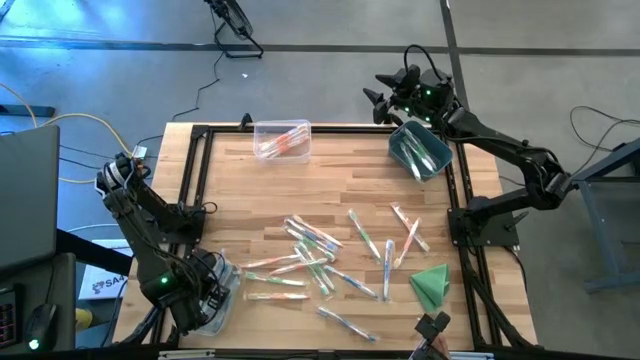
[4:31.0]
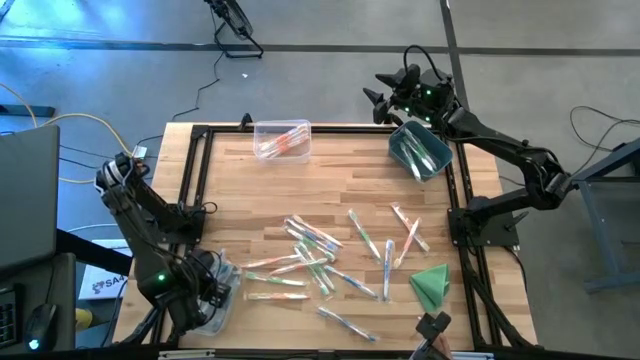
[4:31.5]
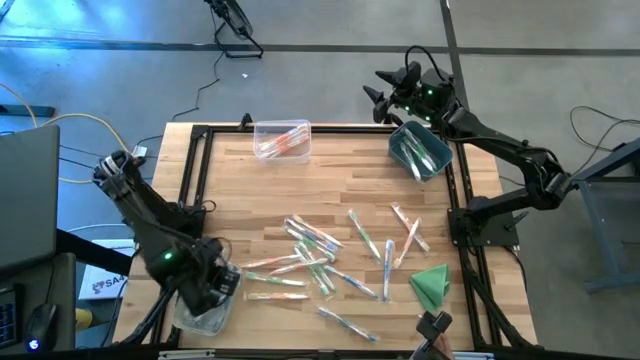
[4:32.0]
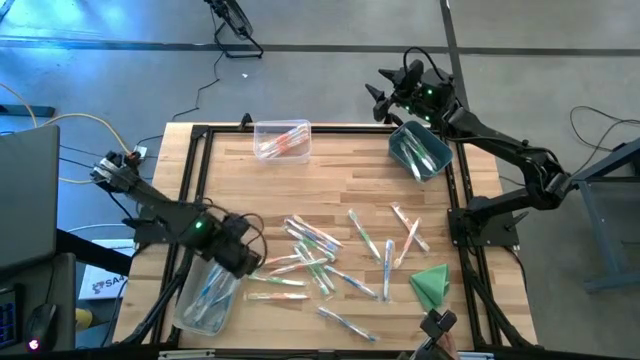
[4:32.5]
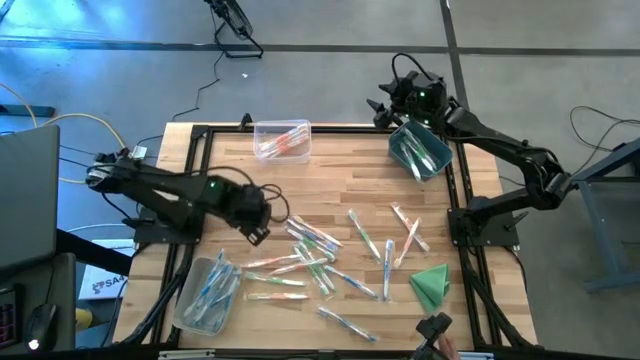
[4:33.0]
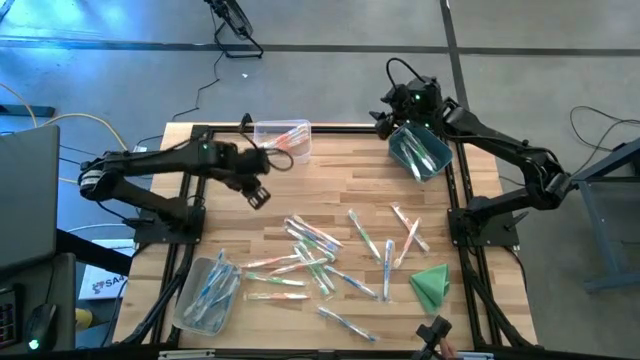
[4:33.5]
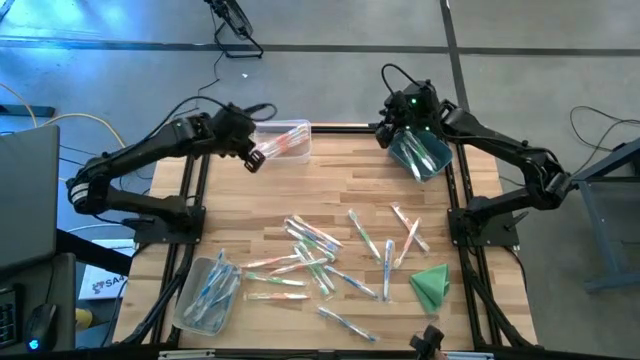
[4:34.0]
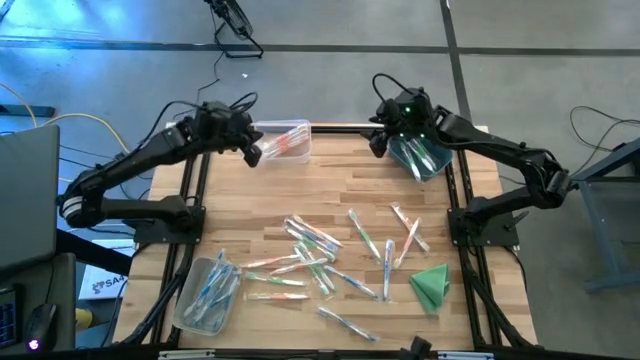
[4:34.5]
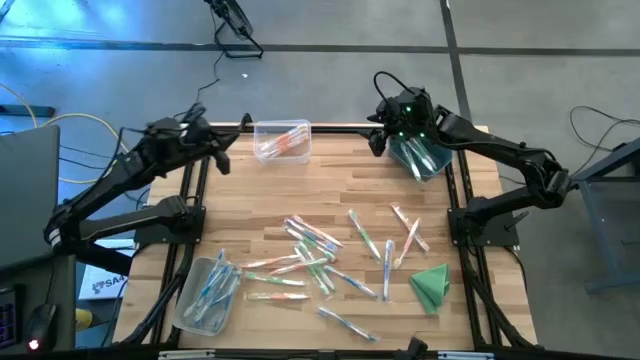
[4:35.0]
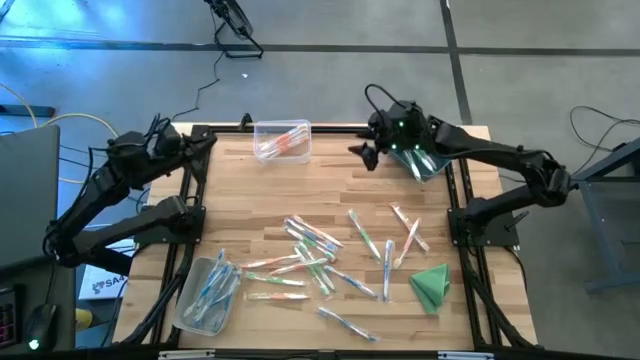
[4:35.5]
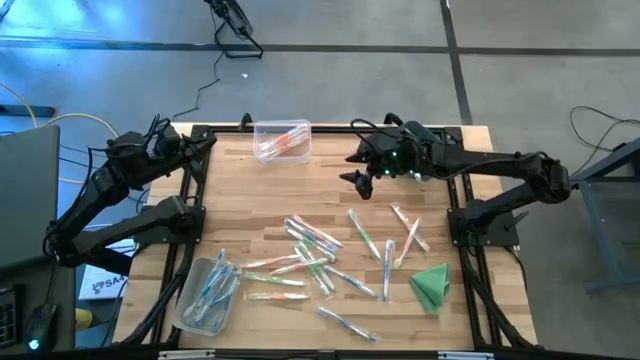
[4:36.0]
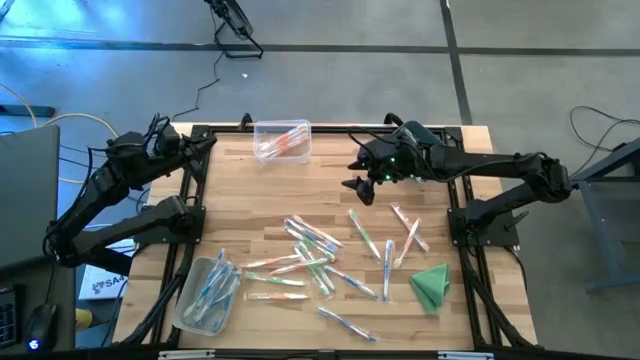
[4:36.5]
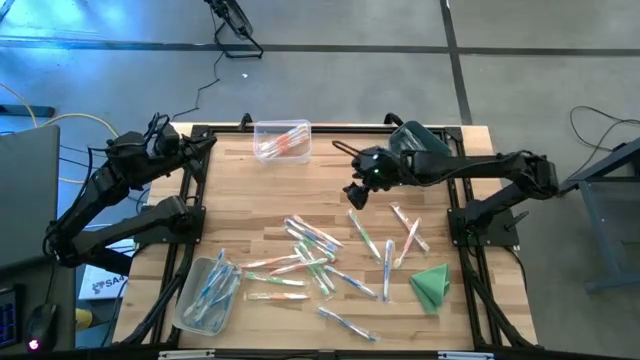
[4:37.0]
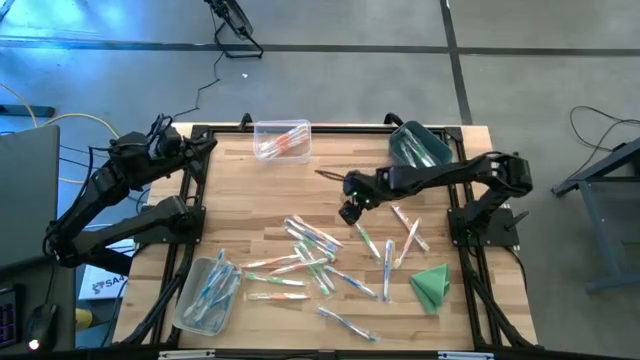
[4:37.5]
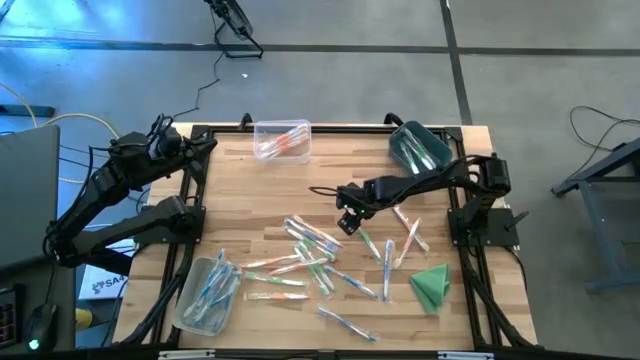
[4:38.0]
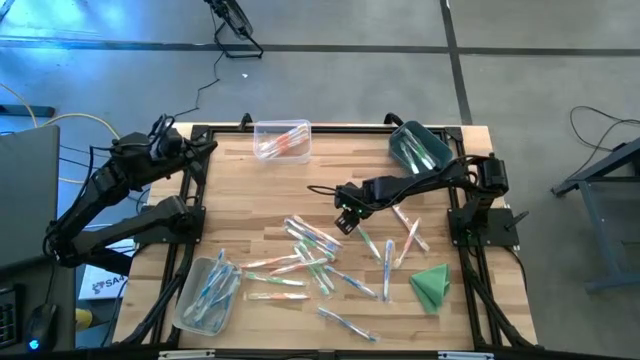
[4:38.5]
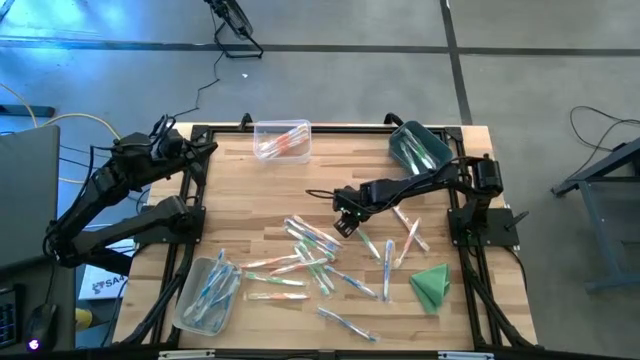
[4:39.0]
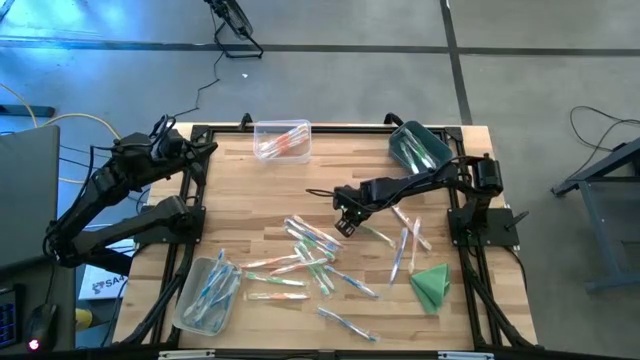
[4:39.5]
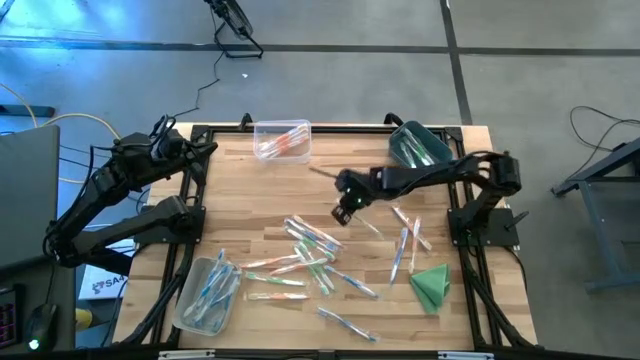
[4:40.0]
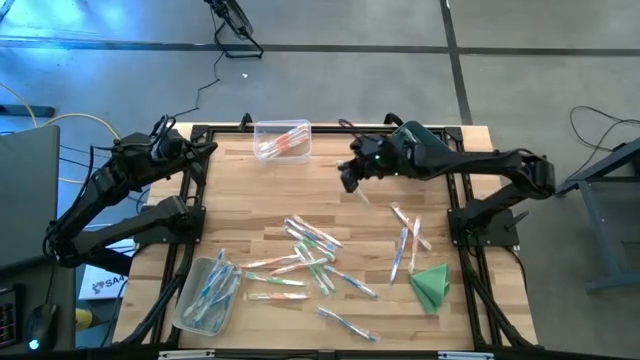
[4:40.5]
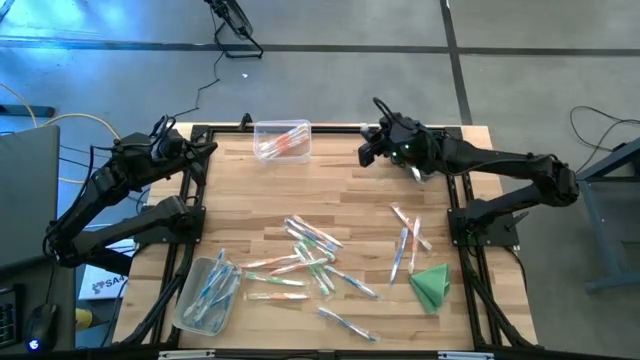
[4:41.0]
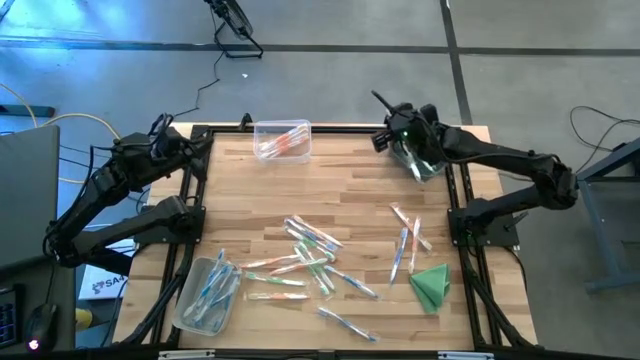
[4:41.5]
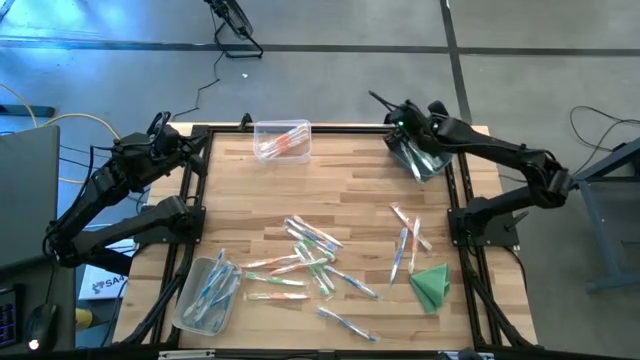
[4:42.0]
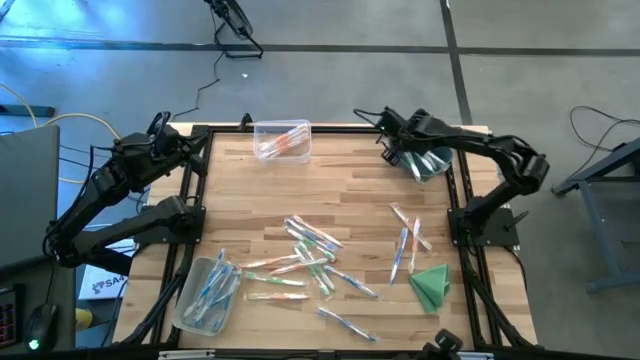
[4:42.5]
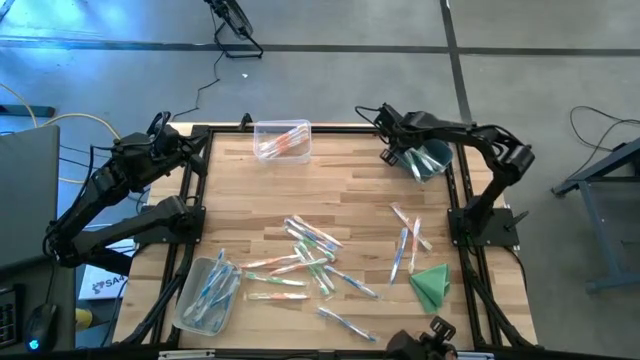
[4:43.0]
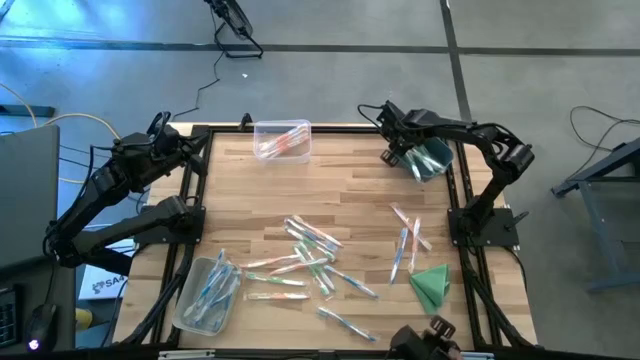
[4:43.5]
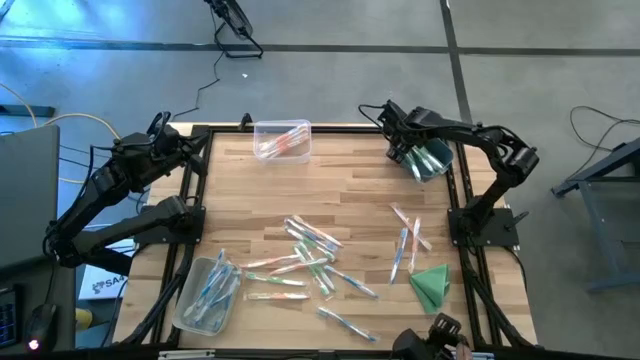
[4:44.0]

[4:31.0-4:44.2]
Task: Pick & Place Toothbrushes
Put the green toothbrush into the blue bin
